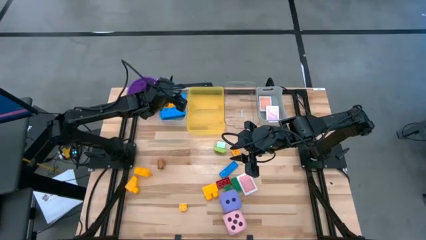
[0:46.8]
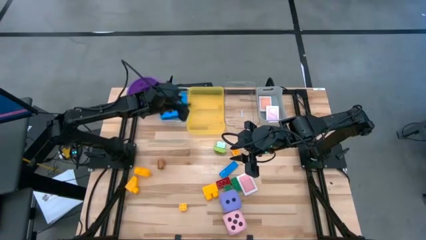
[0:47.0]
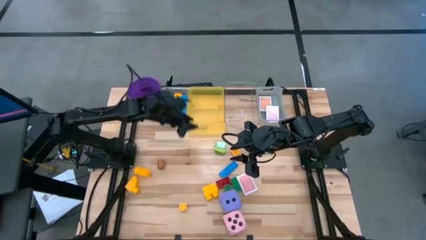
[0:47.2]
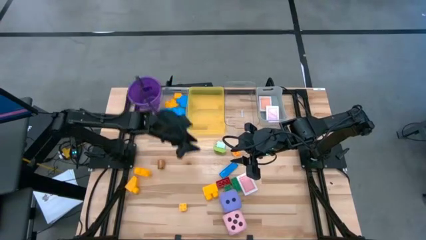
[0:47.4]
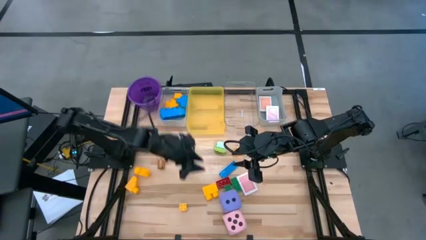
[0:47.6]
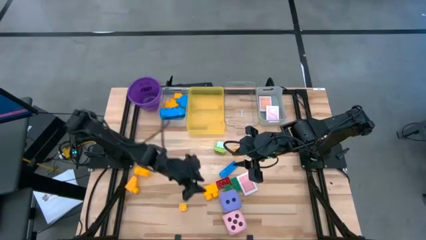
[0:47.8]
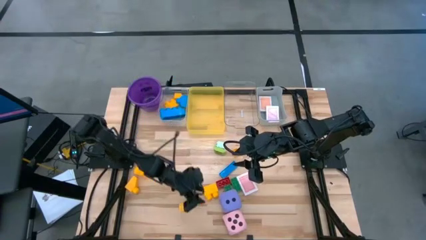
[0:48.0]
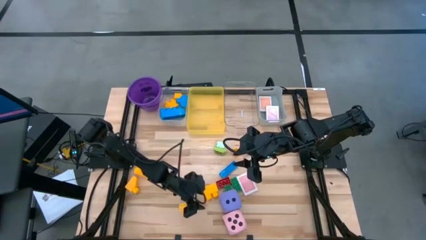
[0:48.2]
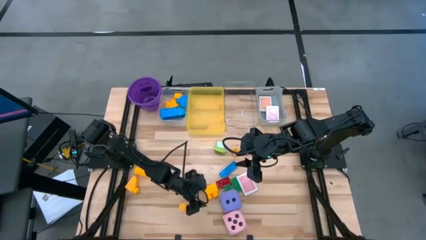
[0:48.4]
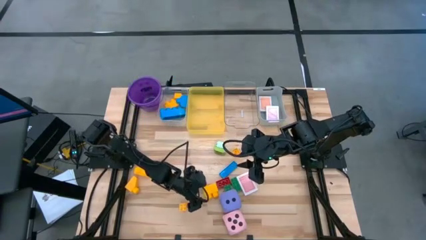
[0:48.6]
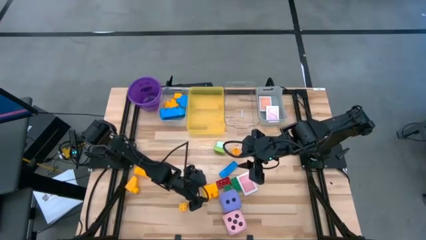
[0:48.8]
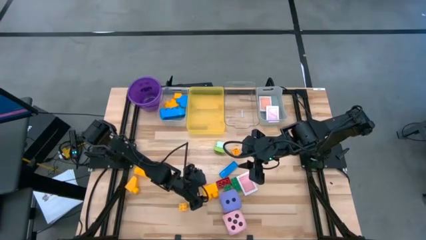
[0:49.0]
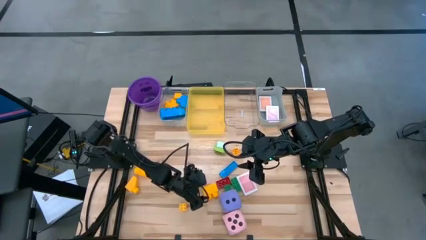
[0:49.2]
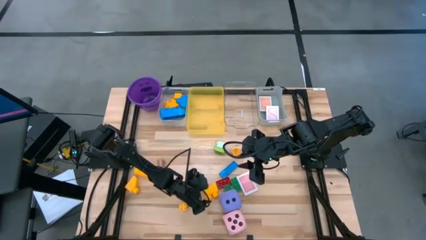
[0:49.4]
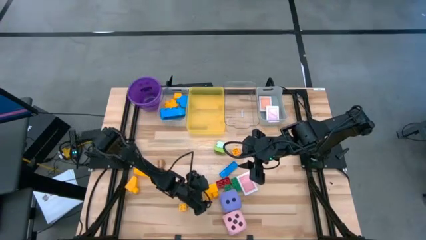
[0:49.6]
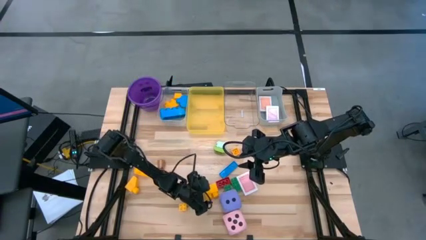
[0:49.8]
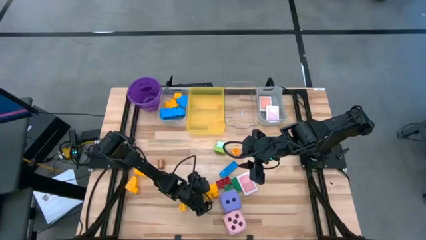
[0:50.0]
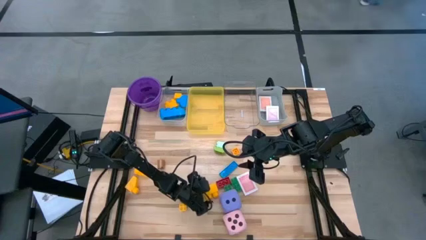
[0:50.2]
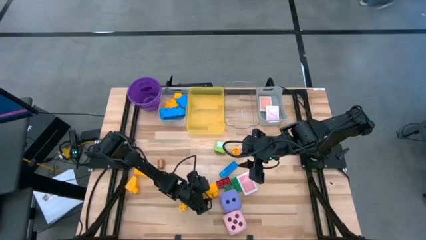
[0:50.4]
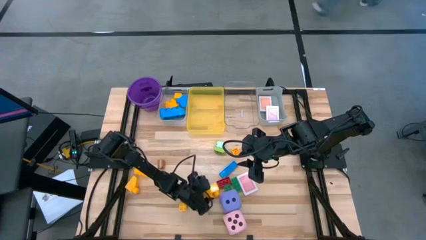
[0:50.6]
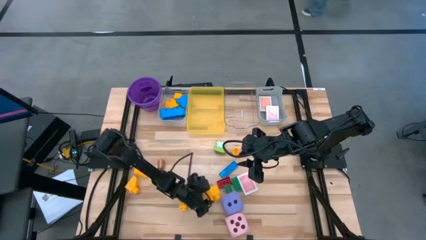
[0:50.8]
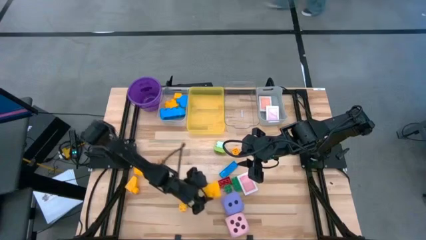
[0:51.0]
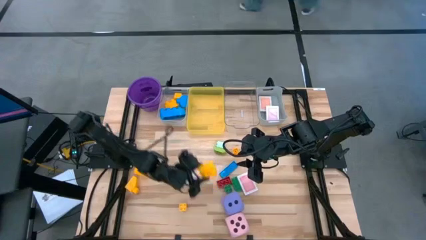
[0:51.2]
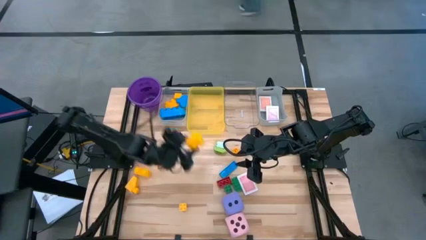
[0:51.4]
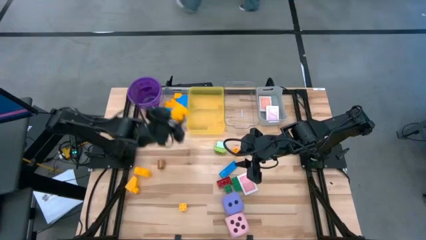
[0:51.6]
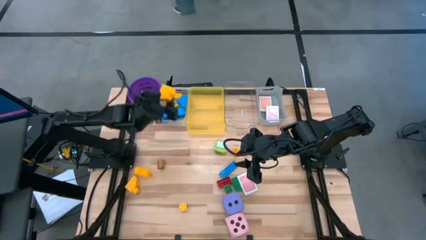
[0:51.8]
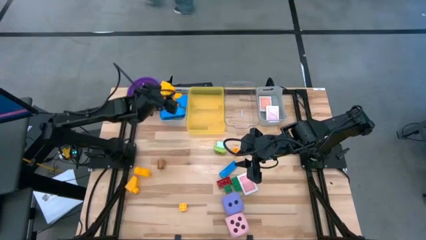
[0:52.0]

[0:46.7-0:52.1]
Task: Pick & Place Toys
Put the big yellow game piece into the white bin

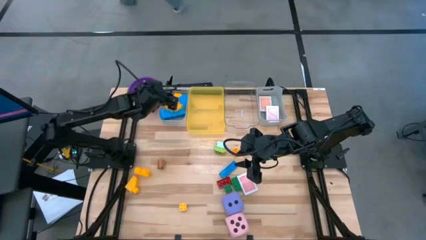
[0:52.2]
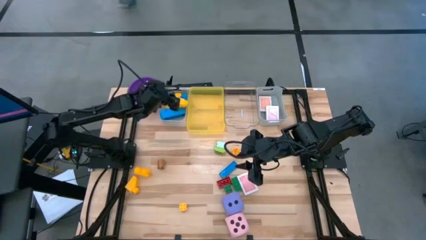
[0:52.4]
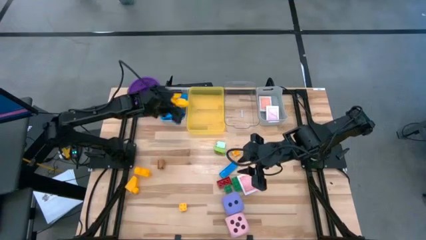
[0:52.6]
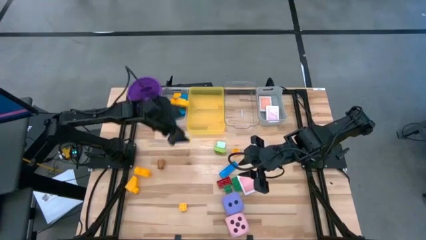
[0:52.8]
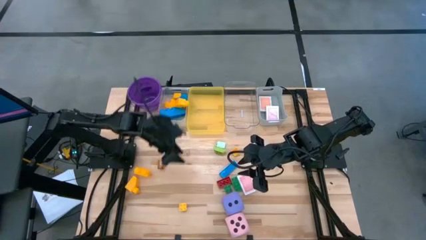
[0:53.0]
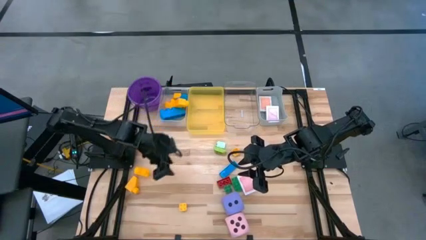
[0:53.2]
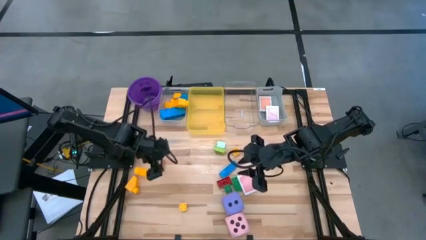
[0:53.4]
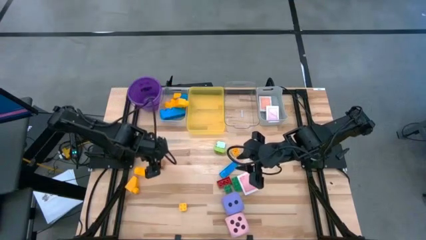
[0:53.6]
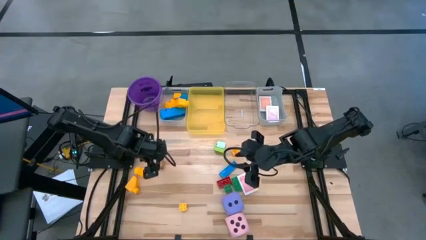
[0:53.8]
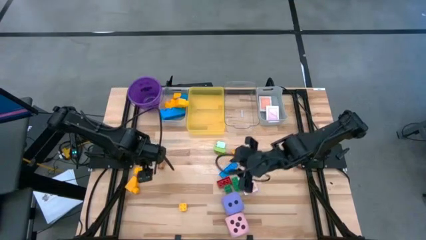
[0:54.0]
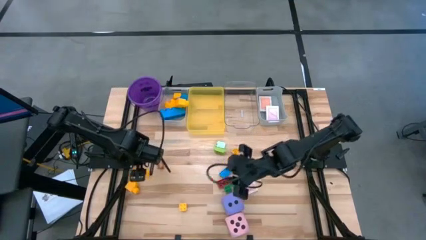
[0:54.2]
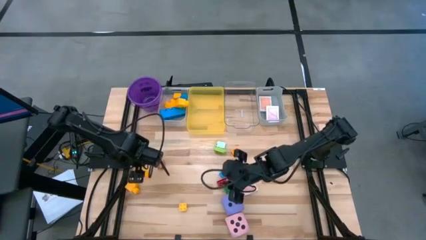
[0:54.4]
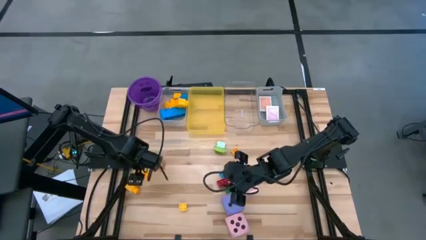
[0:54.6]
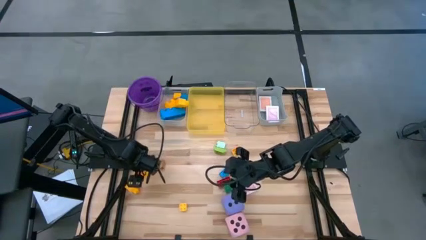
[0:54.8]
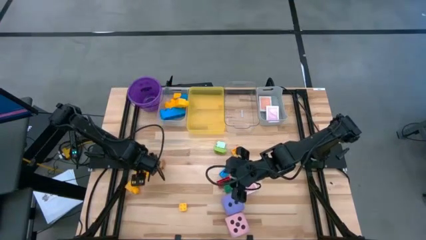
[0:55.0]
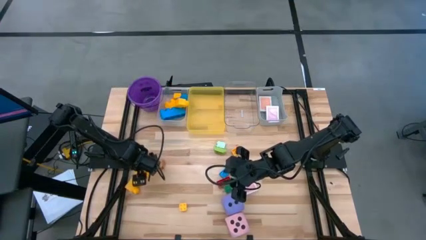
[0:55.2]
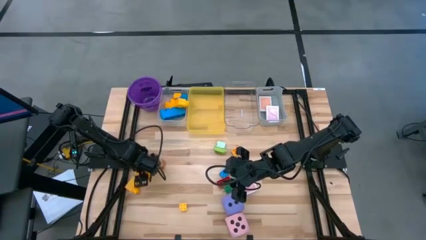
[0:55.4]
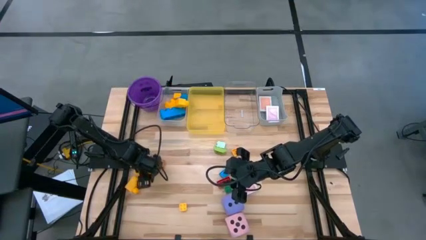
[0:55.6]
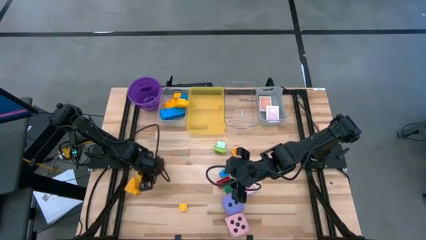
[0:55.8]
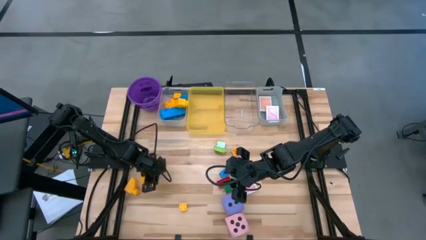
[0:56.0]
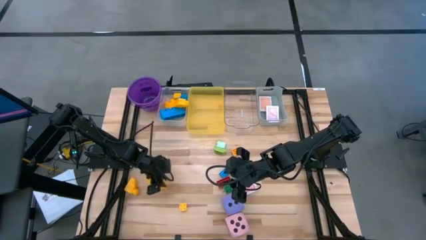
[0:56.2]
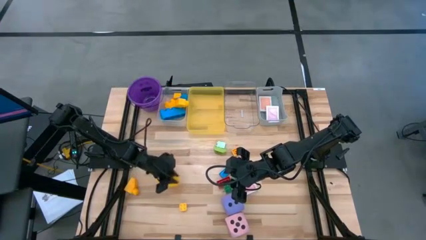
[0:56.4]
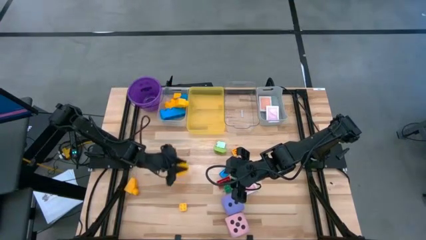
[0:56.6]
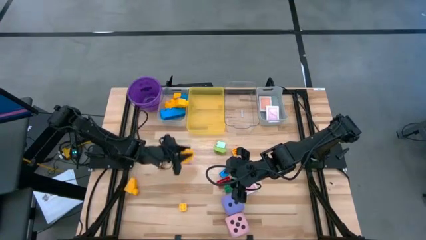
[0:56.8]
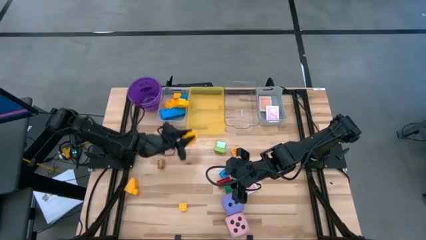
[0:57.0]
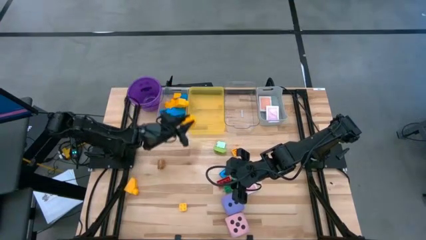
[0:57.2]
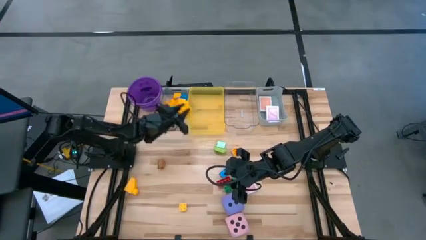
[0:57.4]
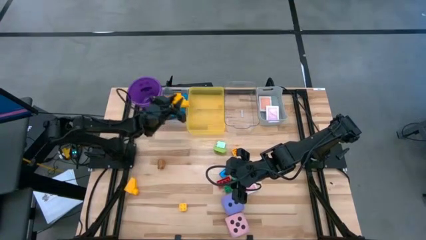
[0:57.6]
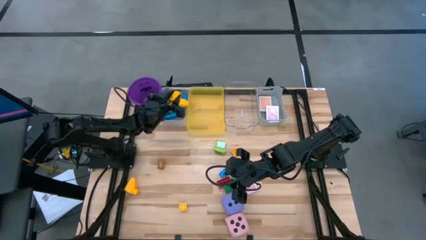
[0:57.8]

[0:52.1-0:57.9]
Put the big yellow game piece into the white bin

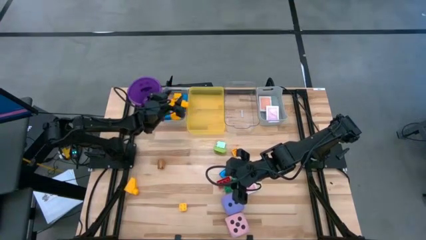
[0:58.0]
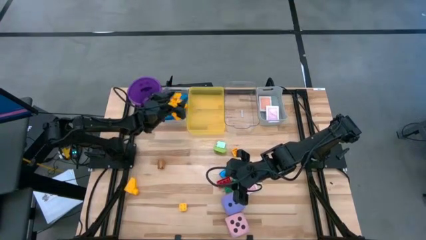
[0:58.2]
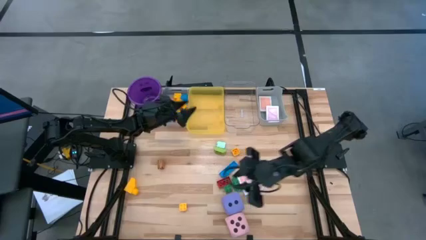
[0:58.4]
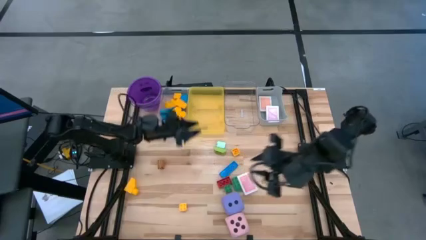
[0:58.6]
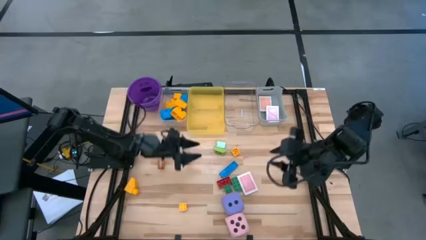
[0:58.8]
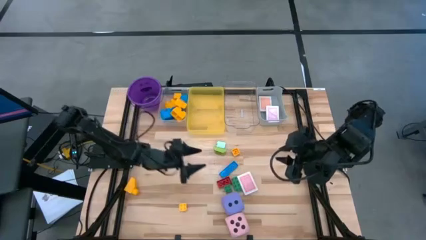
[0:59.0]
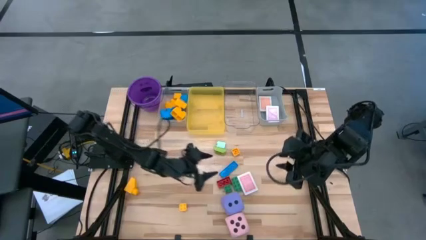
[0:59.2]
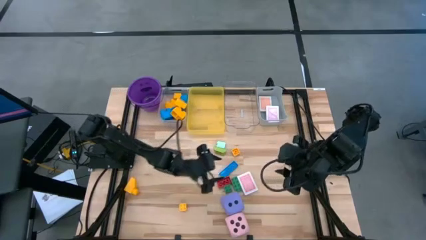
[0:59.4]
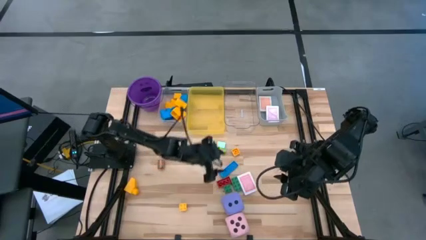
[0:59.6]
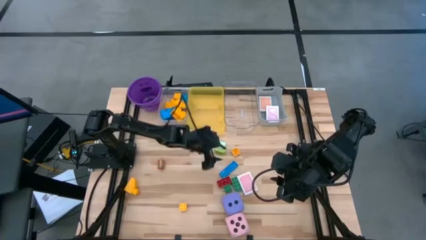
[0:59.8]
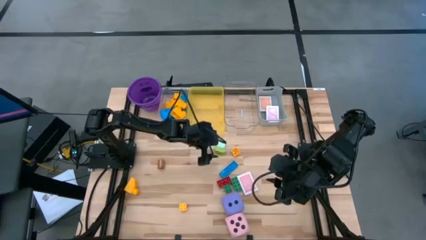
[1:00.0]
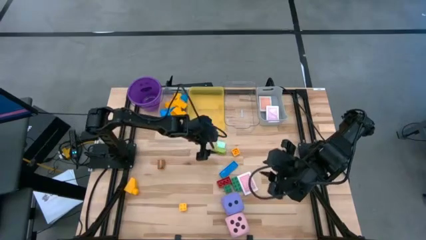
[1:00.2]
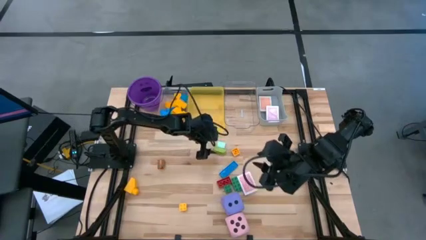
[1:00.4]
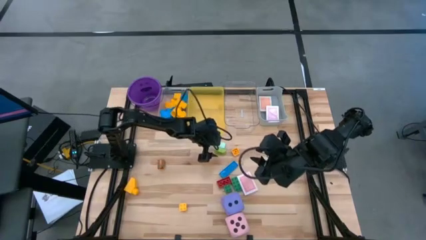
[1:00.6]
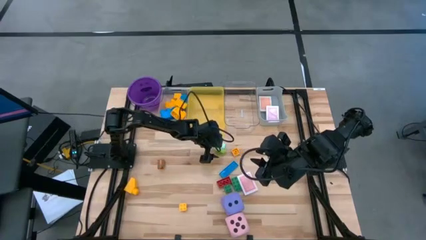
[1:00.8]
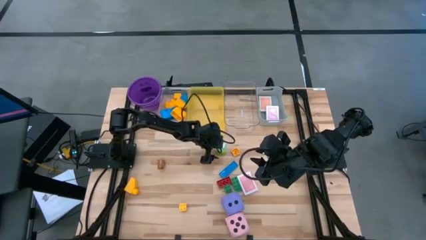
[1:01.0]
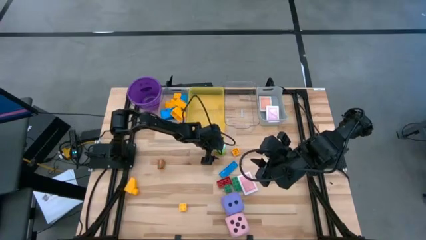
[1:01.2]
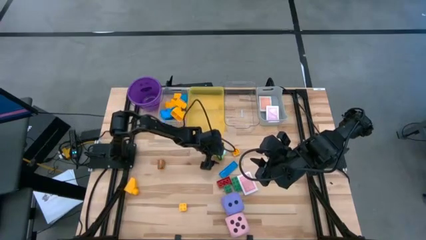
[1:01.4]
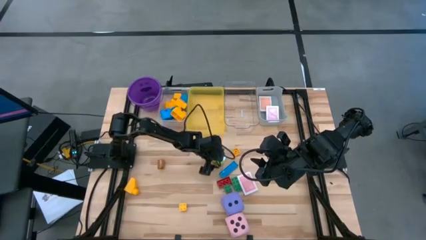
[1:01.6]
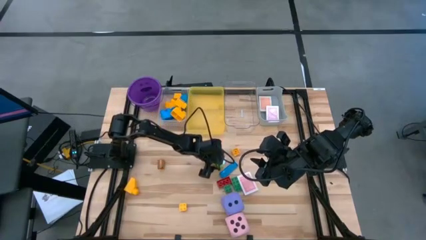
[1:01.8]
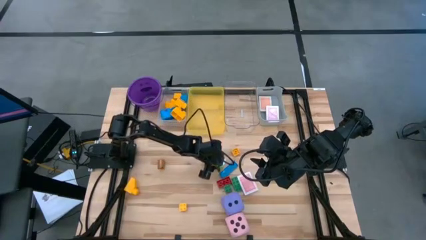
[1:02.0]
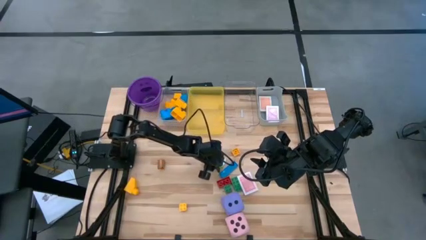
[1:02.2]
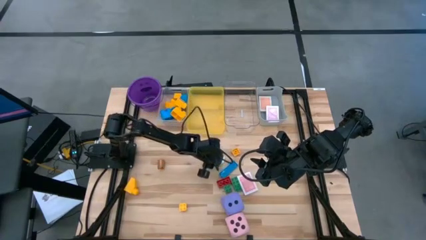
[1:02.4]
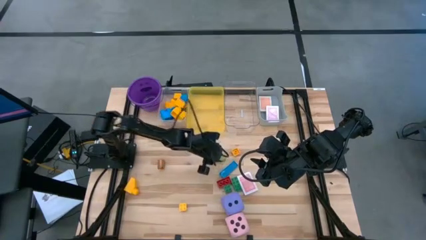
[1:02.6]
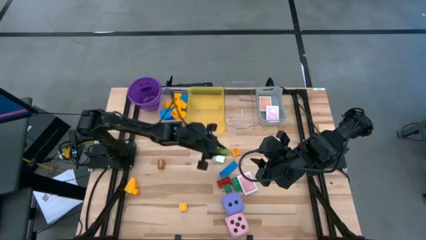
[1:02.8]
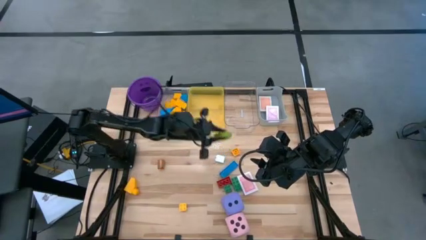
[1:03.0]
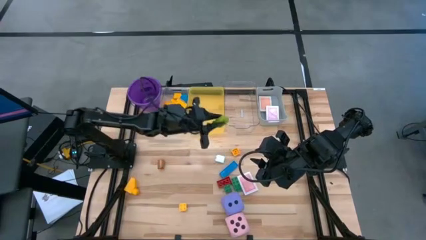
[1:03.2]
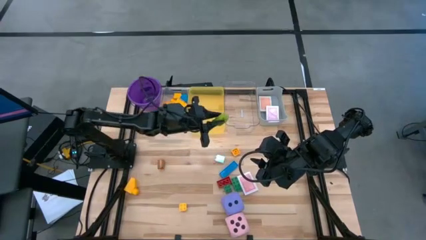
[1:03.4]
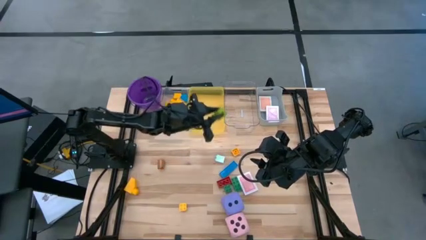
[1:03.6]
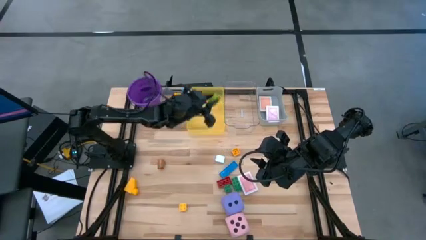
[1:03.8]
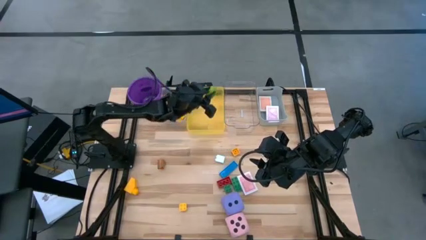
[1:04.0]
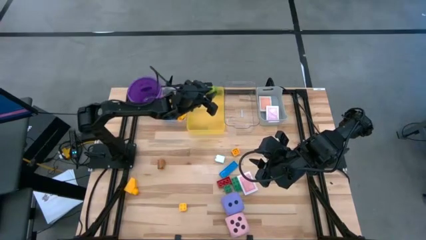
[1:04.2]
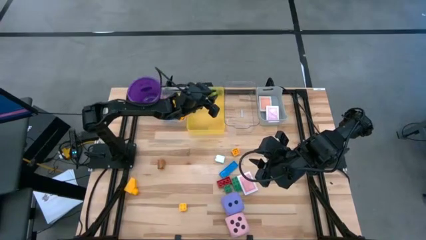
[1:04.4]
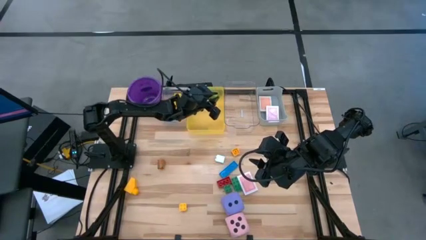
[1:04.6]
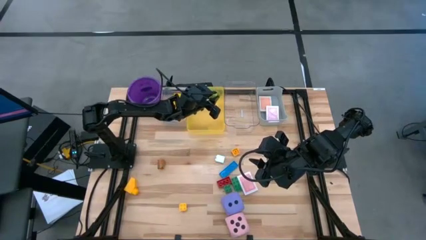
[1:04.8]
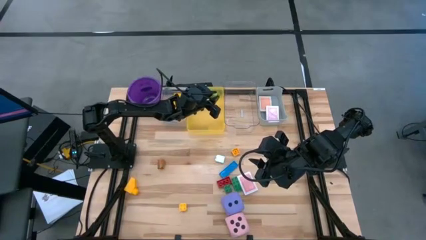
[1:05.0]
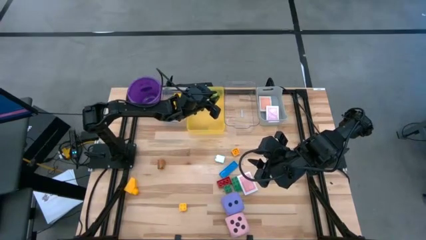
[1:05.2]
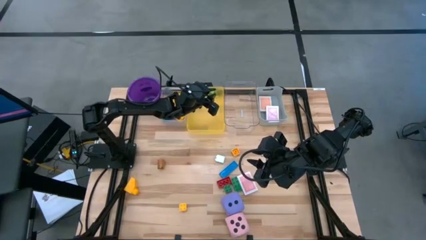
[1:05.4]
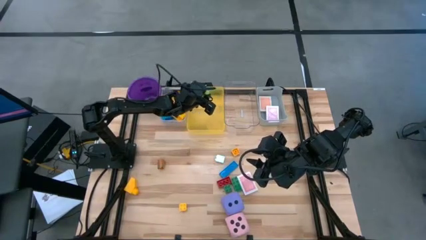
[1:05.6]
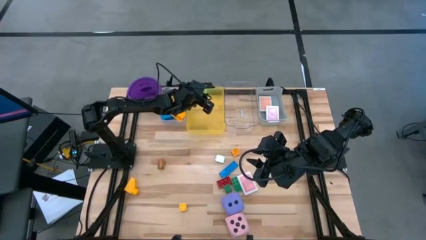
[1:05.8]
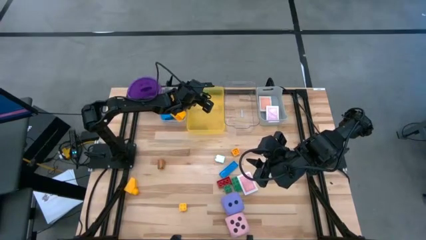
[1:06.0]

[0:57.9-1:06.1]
Put the small green game piece into the yellow bin
